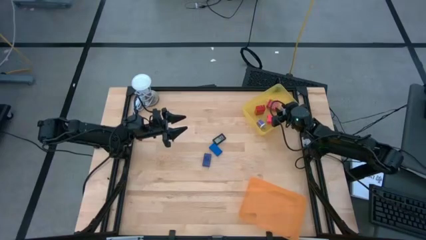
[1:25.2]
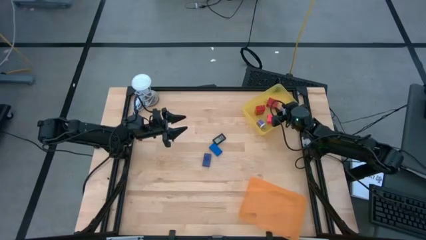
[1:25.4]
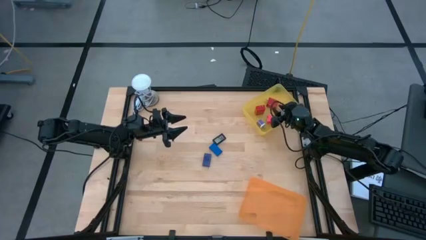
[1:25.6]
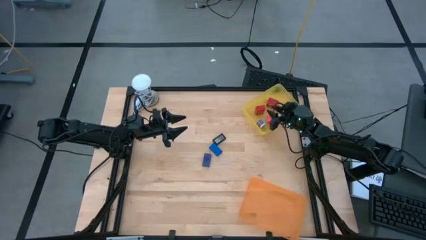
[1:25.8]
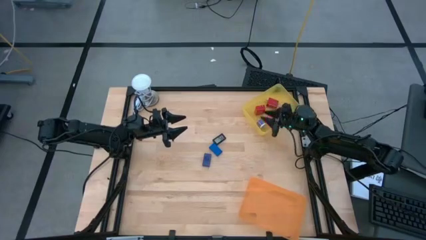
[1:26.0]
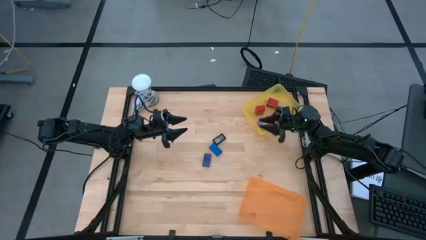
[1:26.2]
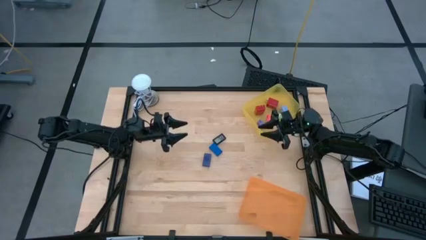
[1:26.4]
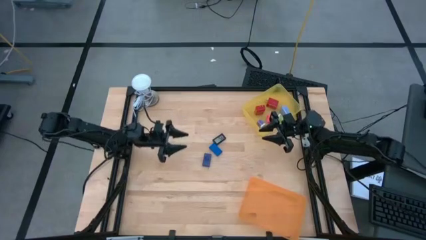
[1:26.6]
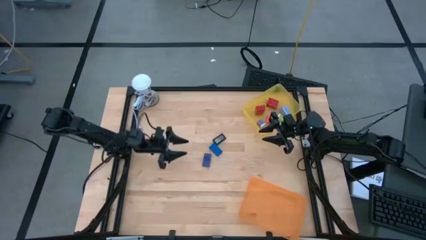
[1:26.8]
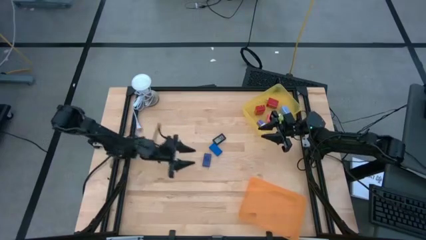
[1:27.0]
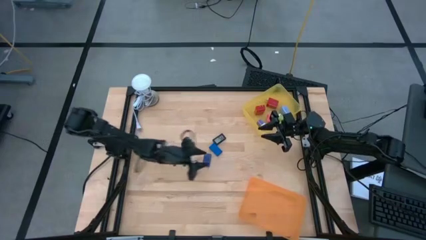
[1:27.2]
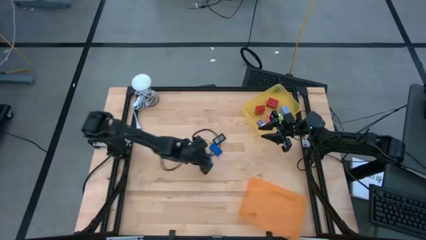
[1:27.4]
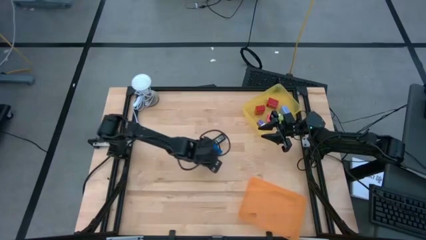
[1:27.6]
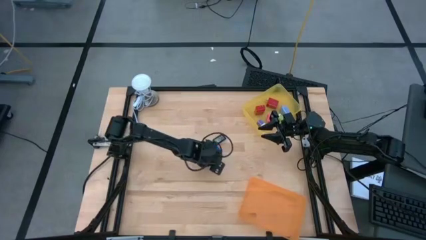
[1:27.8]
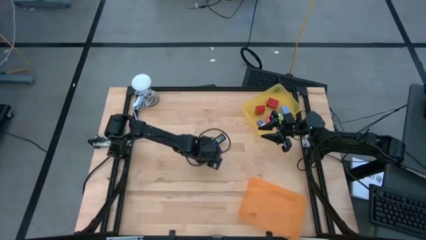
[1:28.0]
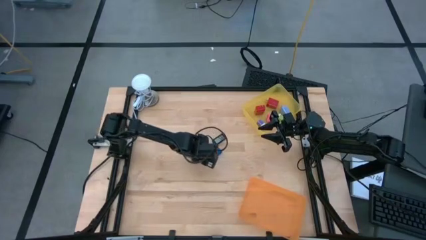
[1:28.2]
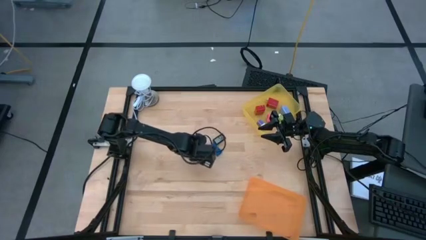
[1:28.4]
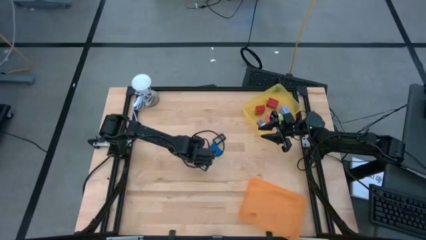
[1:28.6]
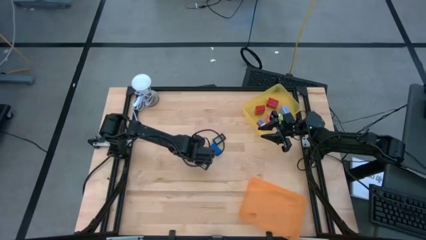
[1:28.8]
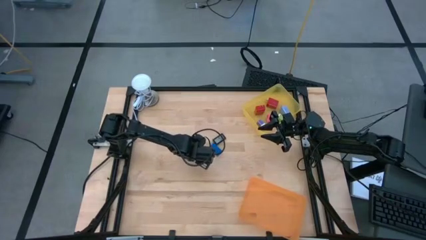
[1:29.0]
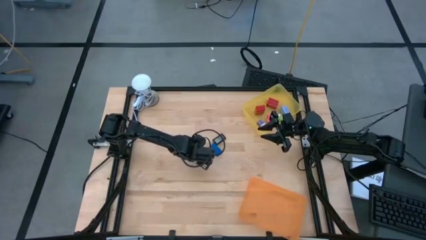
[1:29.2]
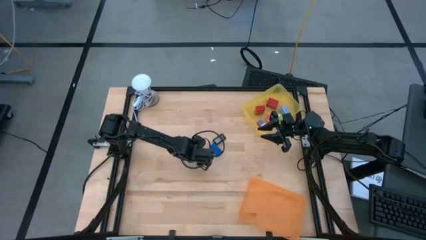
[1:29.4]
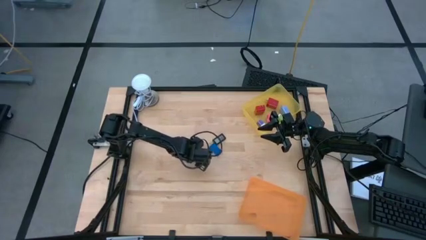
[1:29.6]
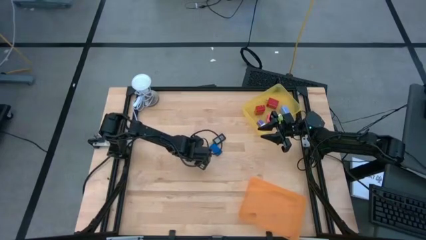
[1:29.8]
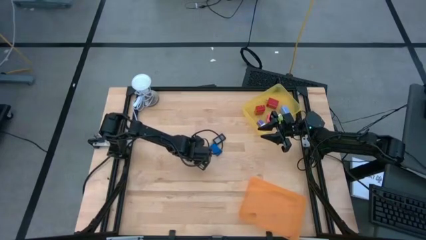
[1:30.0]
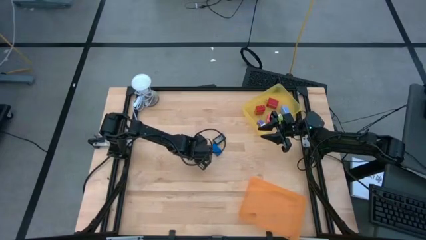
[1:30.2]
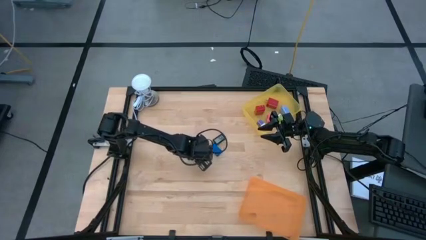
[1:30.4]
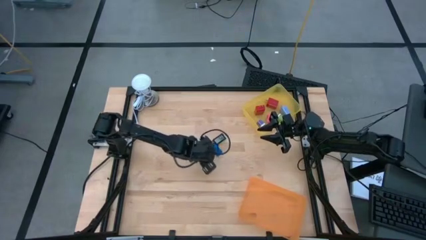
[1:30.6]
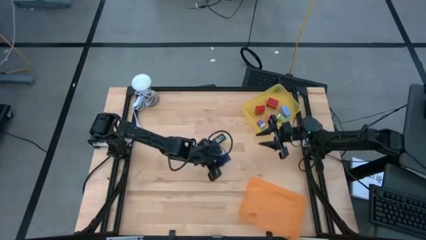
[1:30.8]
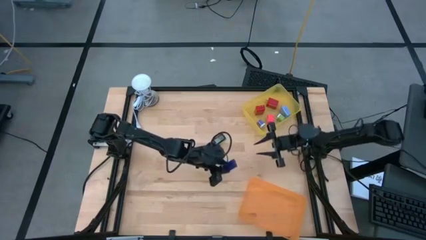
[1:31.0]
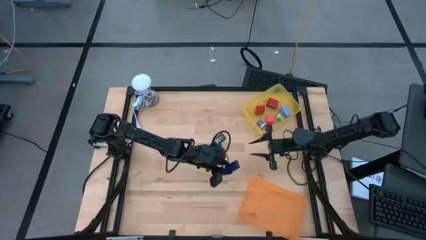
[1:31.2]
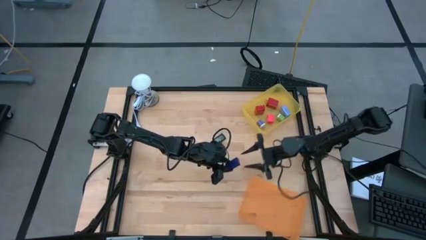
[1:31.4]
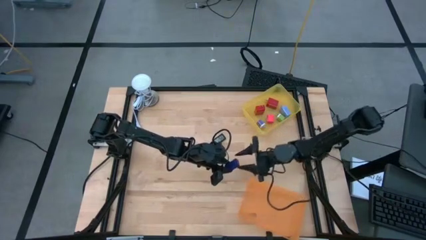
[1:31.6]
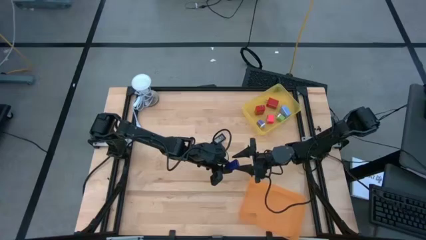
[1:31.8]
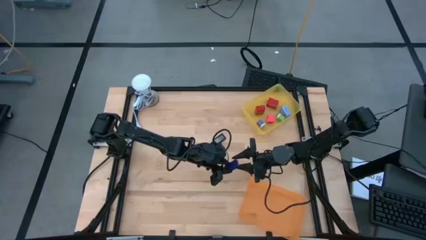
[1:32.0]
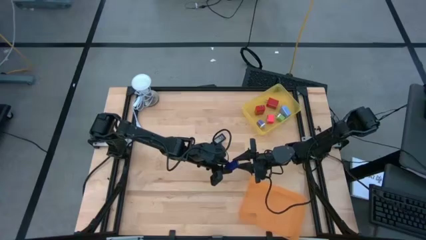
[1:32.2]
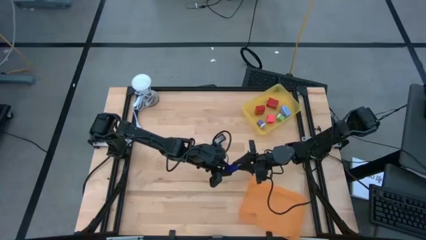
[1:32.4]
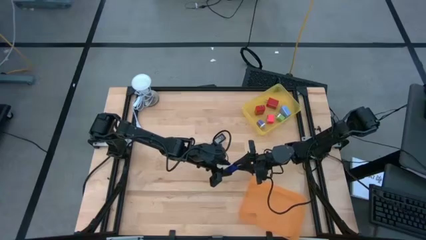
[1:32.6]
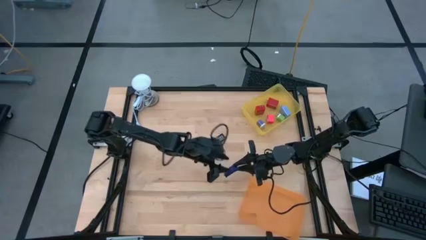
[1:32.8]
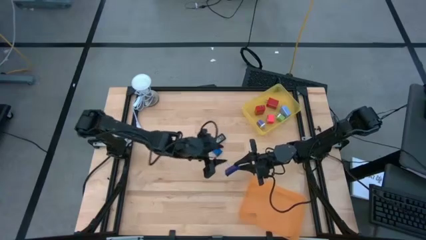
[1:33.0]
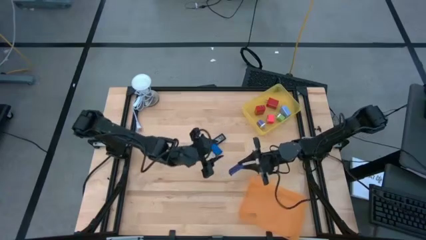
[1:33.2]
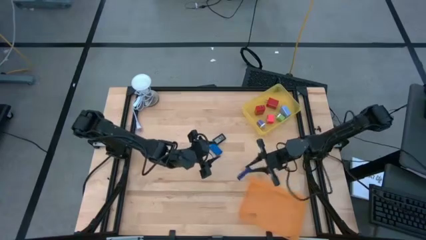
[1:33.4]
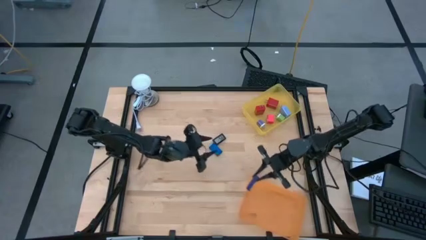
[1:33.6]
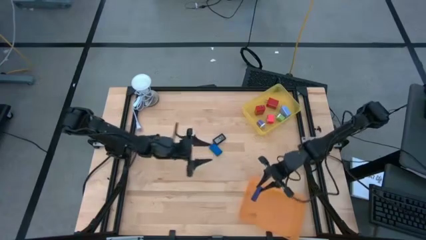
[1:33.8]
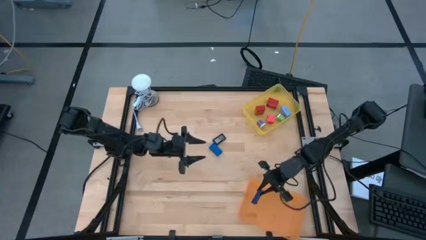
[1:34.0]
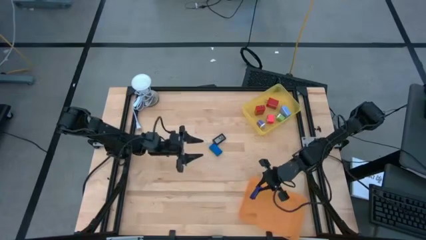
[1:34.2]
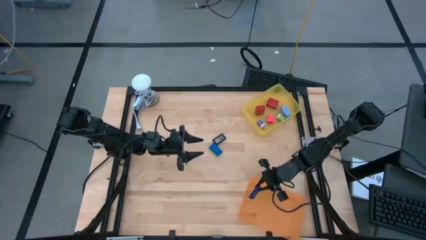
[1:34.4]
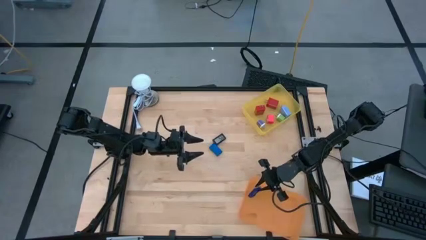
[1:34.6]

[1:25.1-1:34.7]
Task: Pick & Place Office items
Put the dark blue digital clock into the orange bin

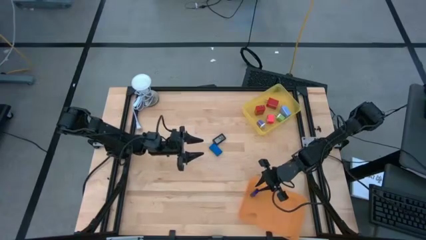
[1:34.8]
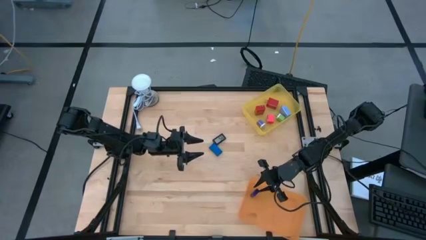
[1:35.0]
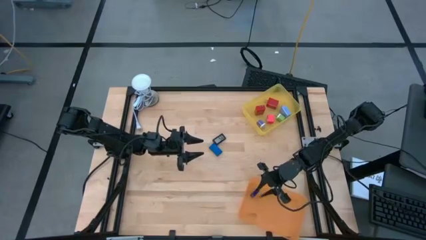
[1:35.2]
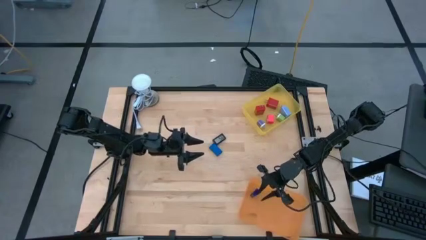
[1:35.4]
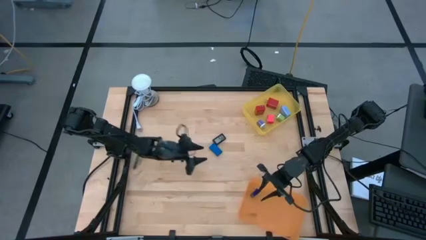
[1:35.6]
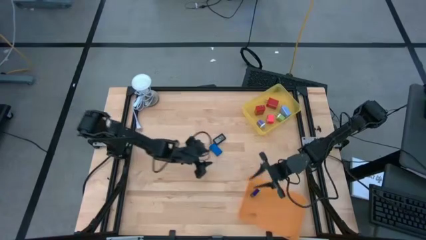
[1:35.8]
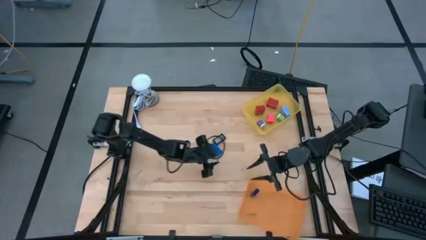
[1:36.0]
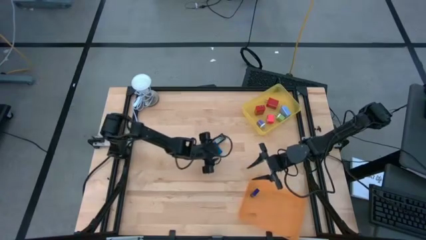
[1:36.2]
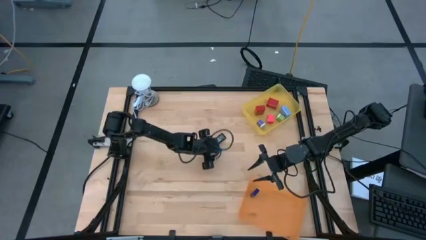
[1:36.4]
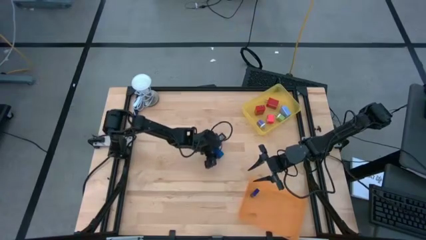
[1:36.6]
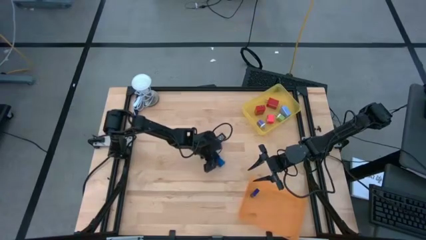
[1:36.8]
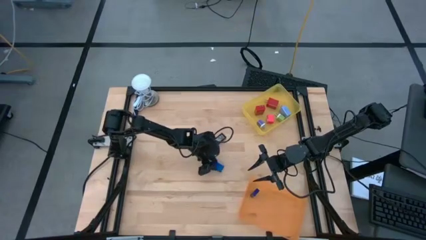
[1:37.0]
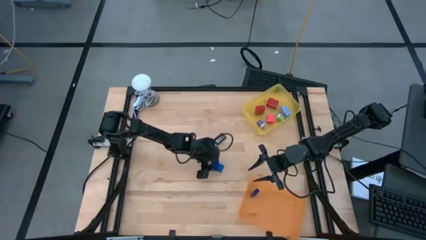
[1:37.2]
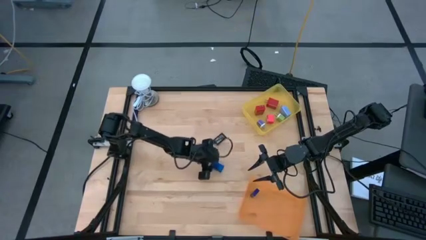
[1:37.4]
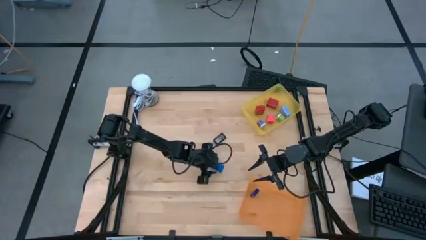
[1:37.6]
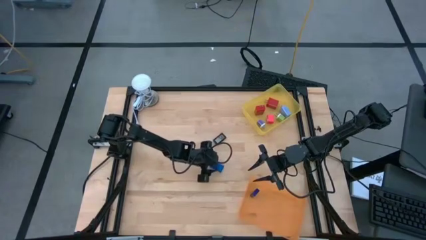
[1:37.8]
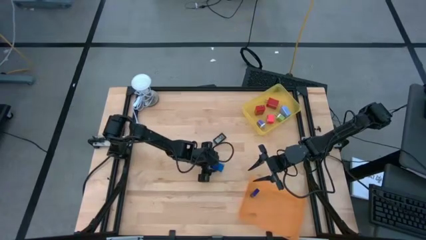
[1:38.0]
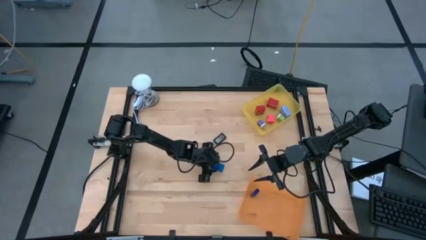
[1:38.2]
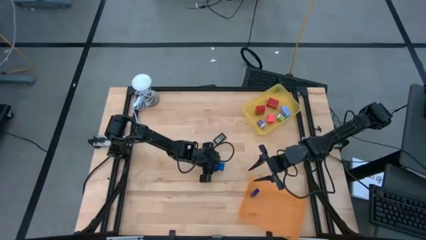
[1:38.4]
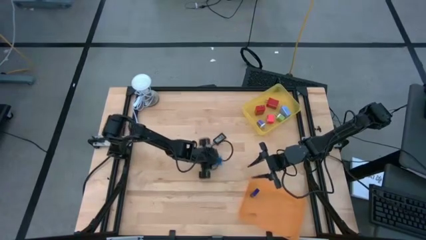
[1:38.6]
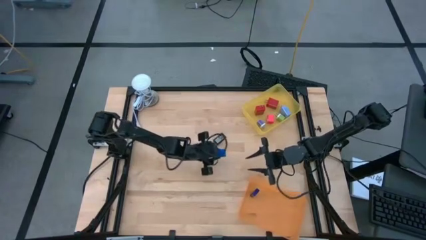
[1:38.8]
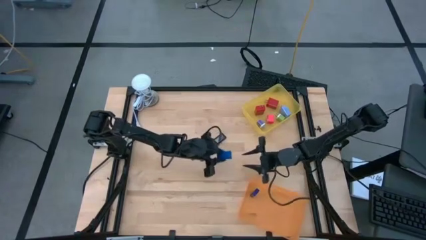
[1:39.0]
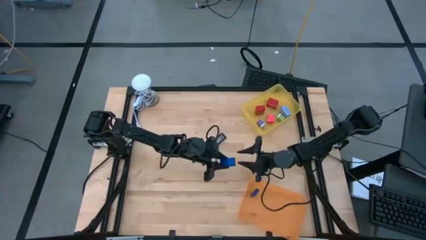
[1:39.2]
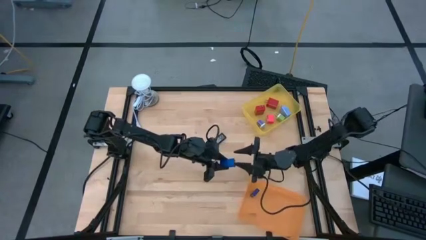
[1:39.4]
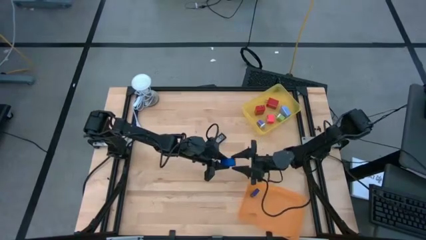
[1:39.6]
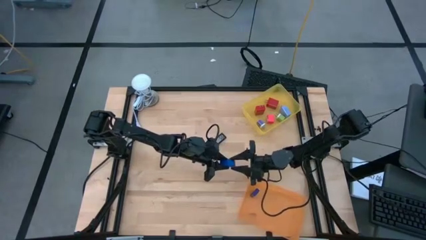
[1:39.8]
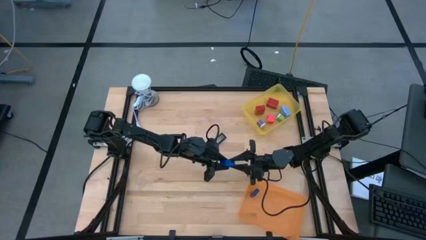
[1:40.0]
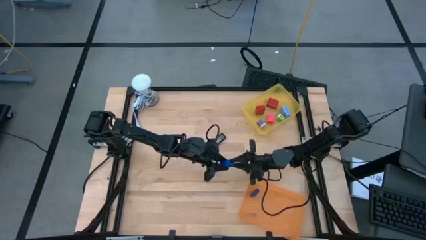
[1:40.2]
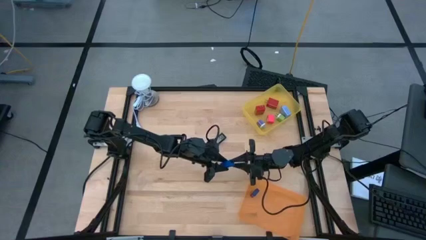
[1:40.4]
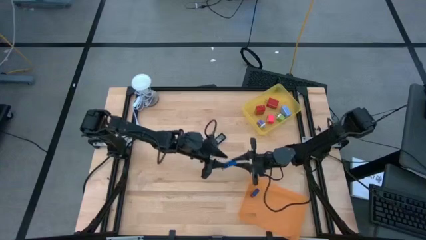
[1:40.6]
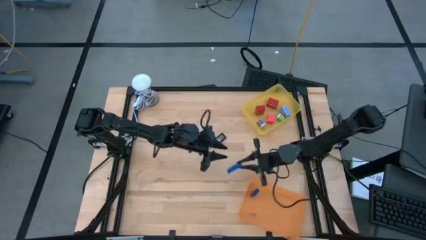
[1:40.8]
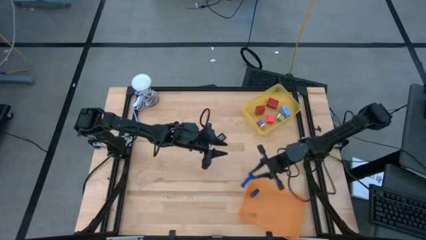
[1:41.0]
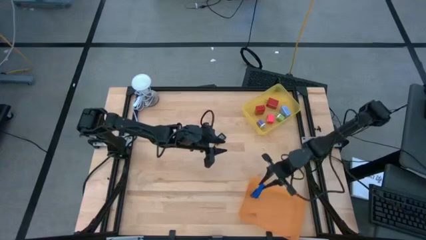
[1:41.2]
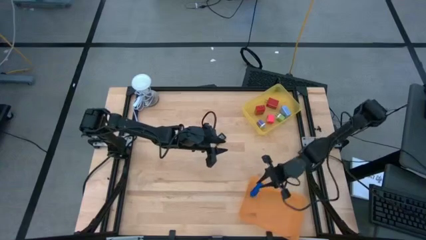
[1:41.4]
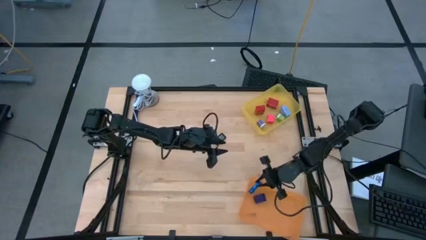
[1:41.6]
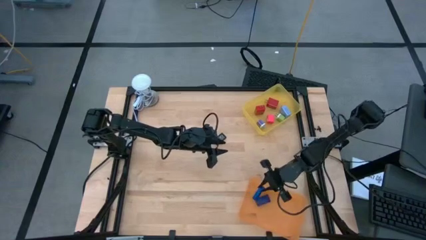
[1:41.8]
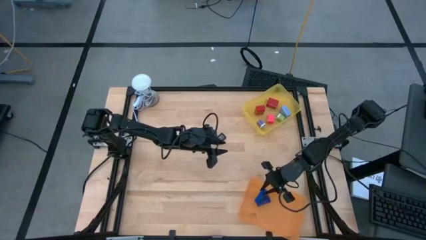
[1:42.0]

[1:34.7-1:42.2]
Put the blue digital clock into the orange bin
